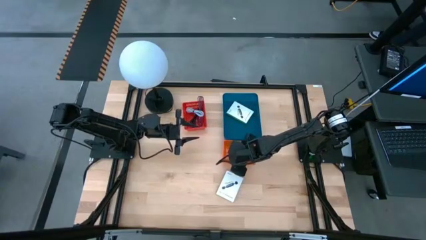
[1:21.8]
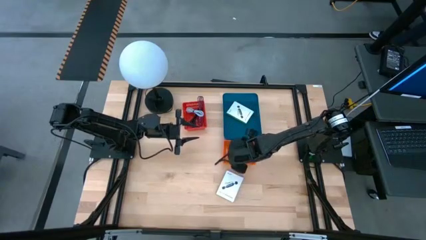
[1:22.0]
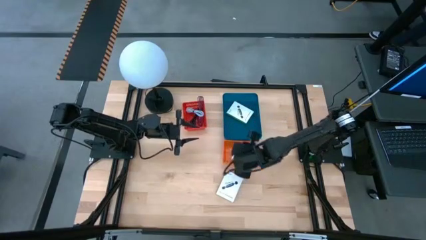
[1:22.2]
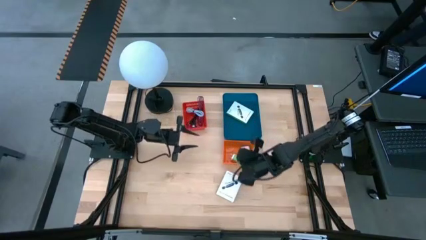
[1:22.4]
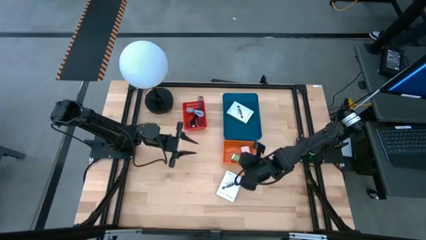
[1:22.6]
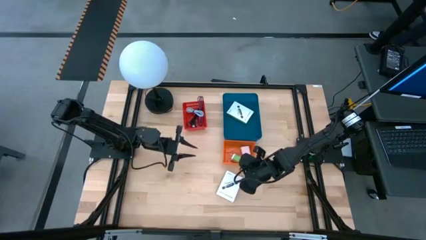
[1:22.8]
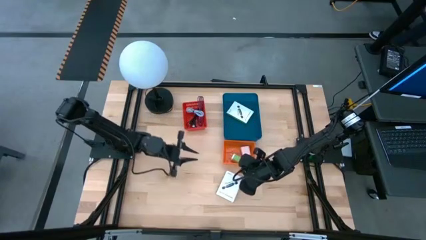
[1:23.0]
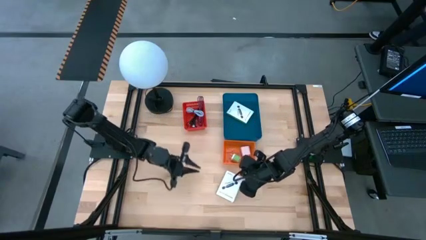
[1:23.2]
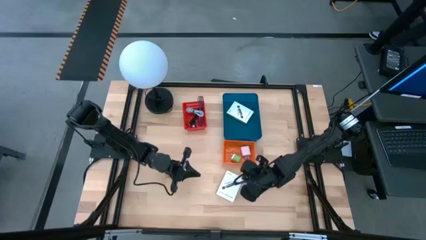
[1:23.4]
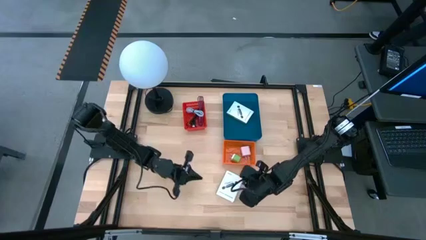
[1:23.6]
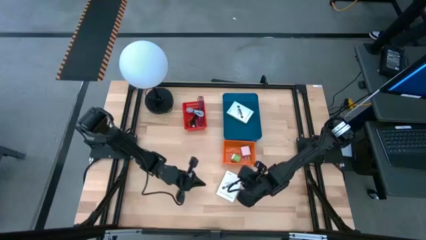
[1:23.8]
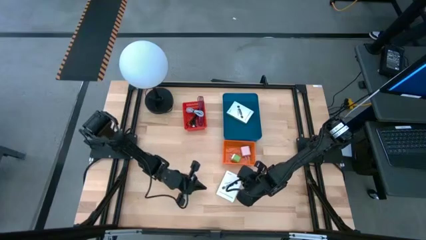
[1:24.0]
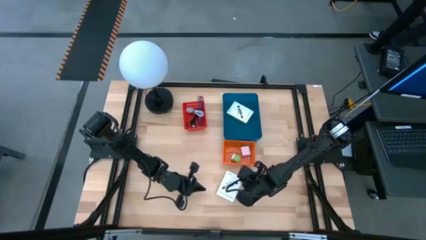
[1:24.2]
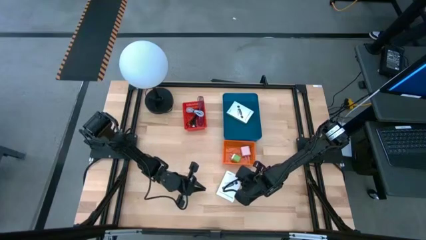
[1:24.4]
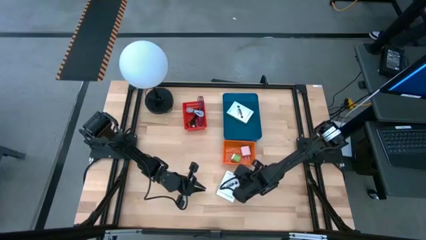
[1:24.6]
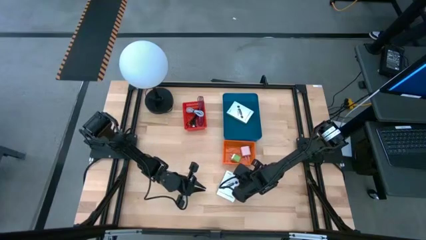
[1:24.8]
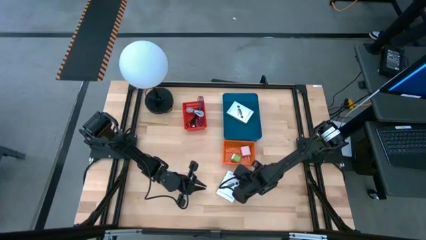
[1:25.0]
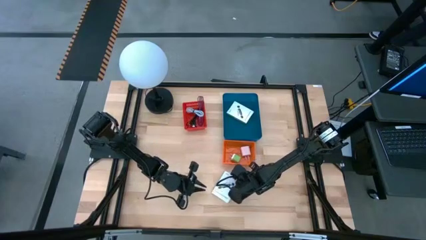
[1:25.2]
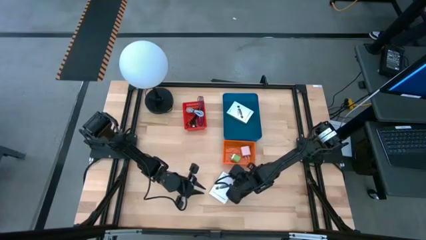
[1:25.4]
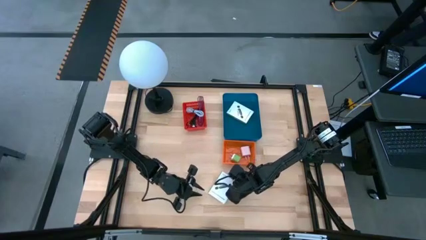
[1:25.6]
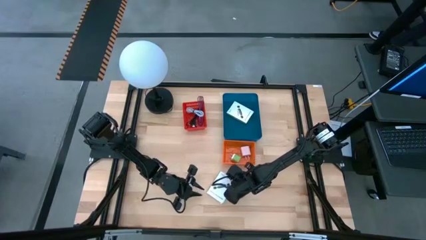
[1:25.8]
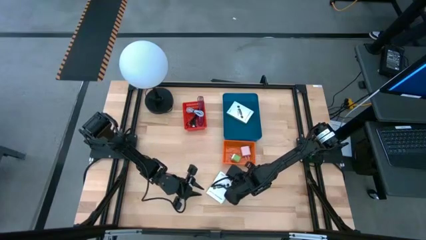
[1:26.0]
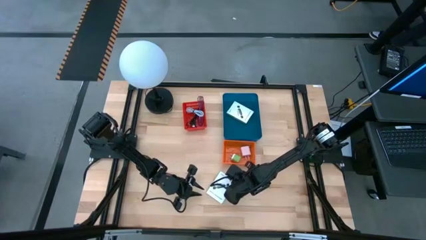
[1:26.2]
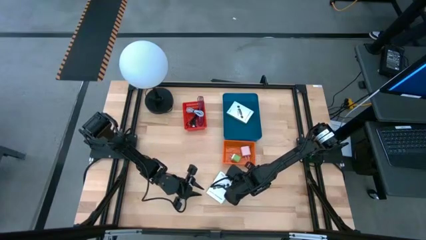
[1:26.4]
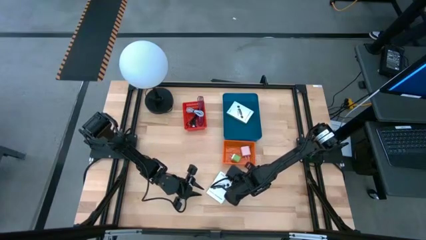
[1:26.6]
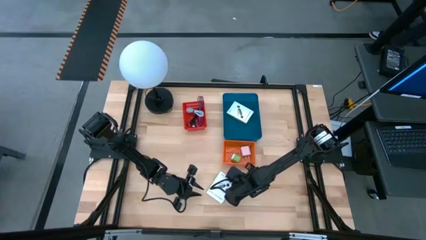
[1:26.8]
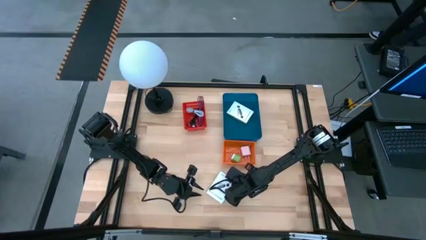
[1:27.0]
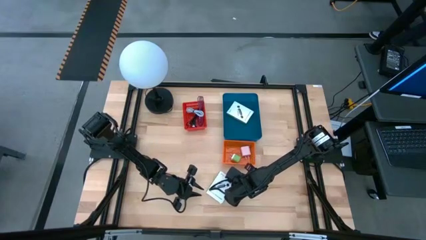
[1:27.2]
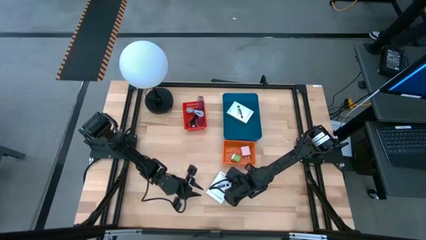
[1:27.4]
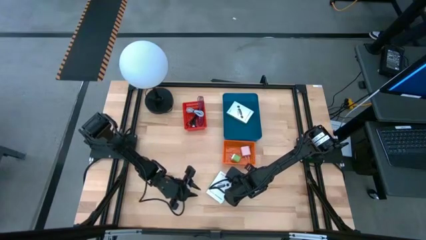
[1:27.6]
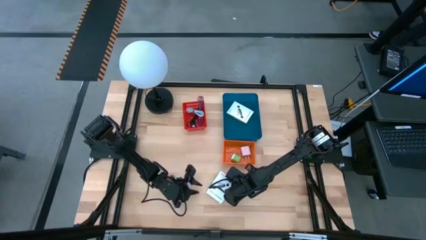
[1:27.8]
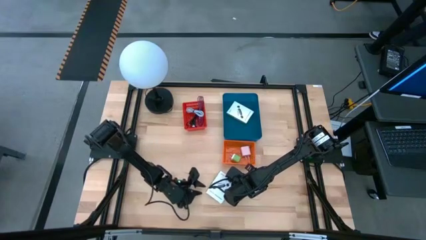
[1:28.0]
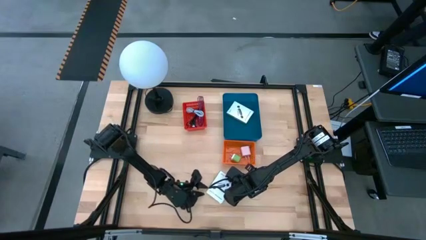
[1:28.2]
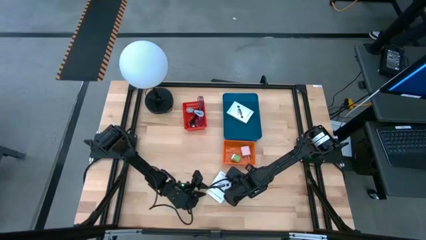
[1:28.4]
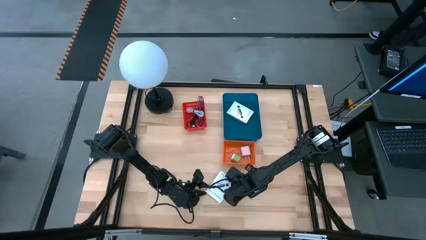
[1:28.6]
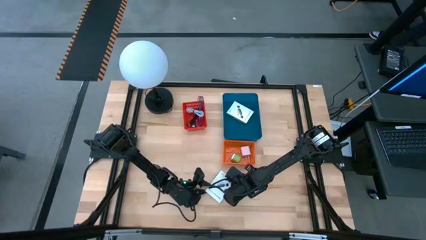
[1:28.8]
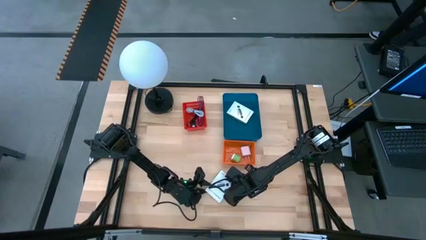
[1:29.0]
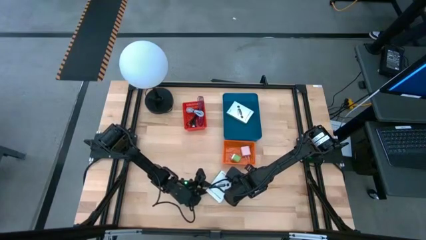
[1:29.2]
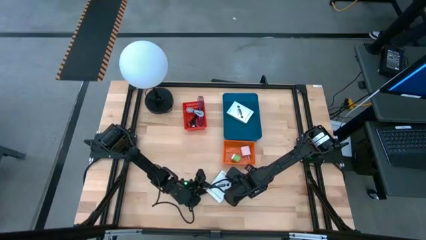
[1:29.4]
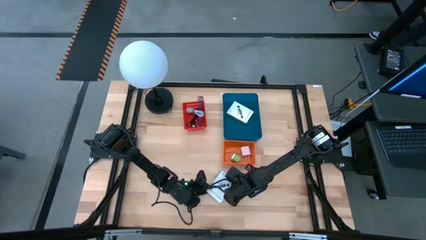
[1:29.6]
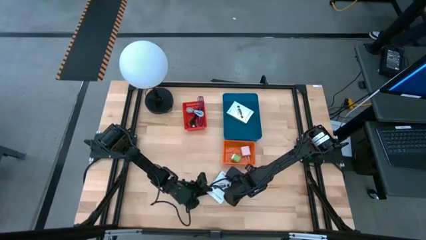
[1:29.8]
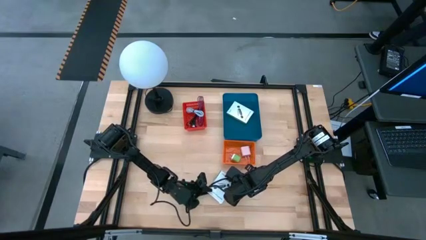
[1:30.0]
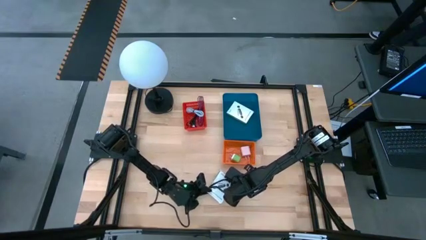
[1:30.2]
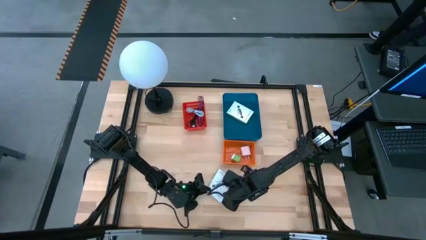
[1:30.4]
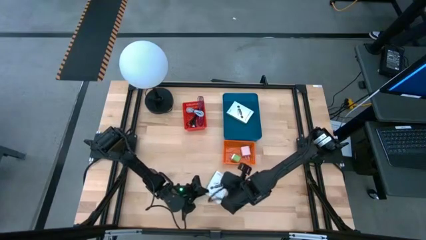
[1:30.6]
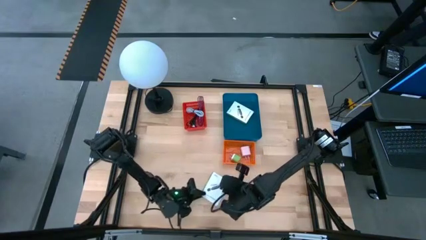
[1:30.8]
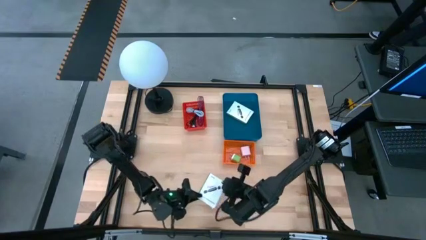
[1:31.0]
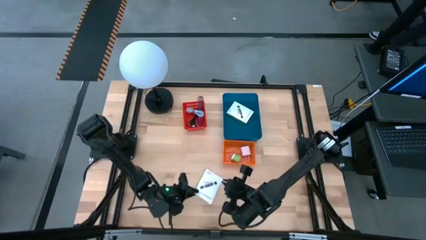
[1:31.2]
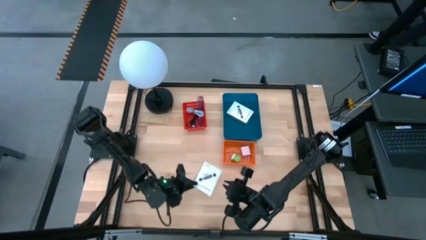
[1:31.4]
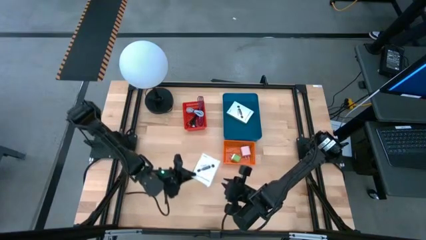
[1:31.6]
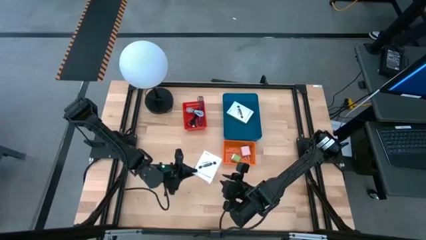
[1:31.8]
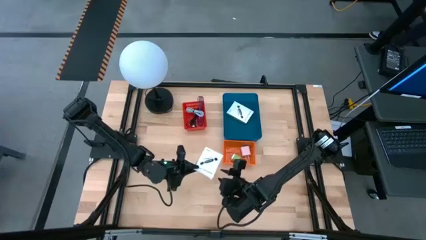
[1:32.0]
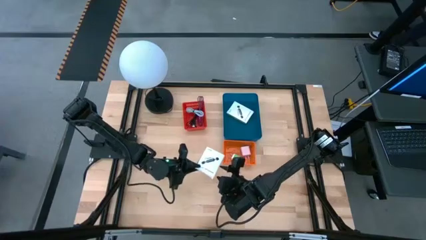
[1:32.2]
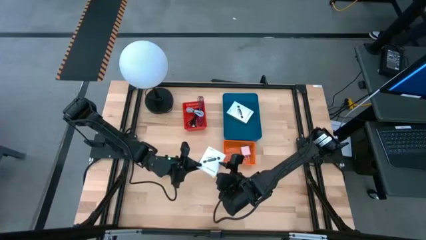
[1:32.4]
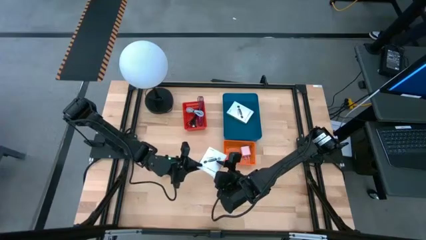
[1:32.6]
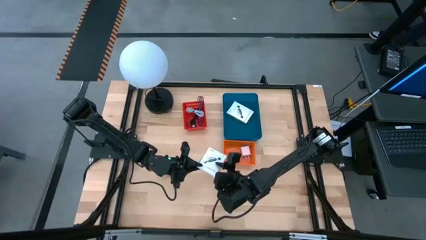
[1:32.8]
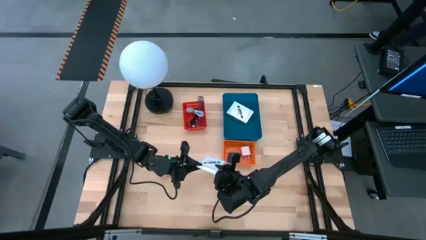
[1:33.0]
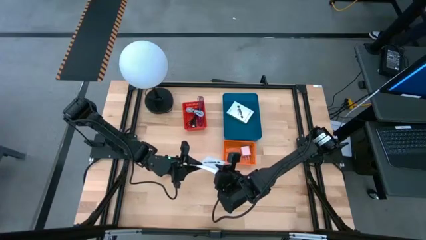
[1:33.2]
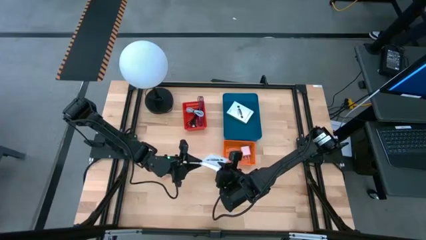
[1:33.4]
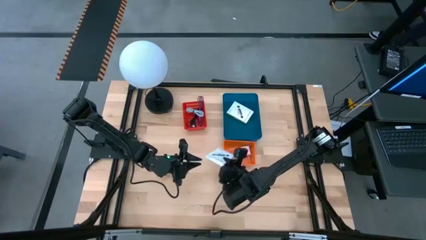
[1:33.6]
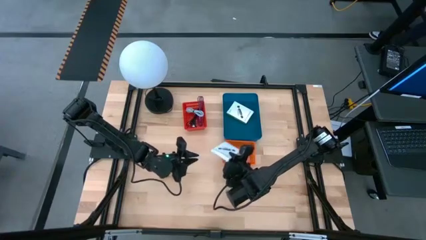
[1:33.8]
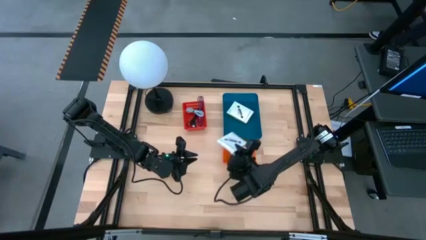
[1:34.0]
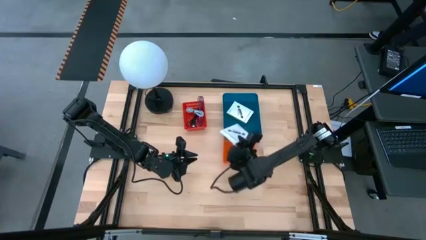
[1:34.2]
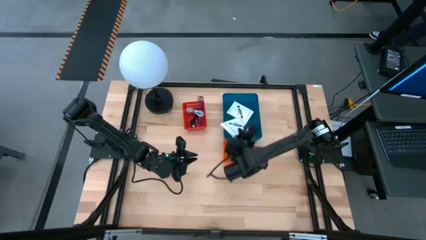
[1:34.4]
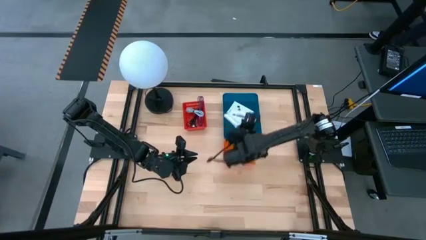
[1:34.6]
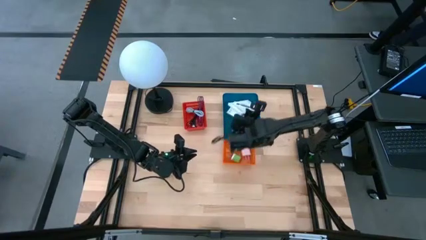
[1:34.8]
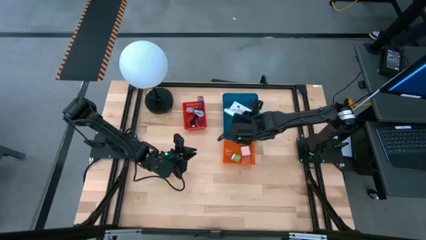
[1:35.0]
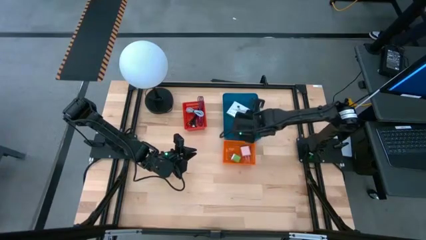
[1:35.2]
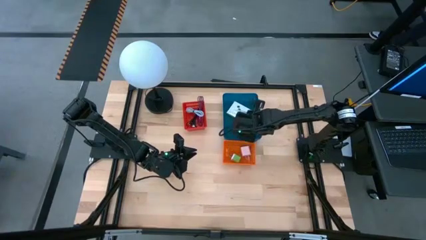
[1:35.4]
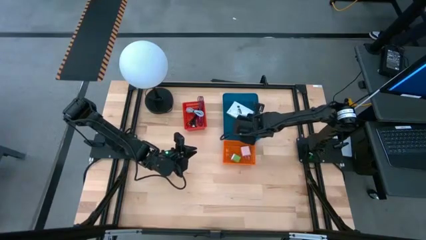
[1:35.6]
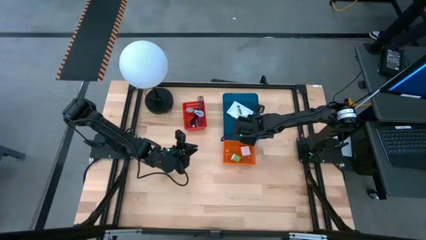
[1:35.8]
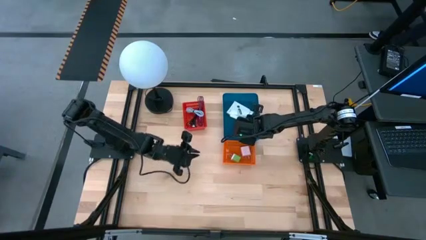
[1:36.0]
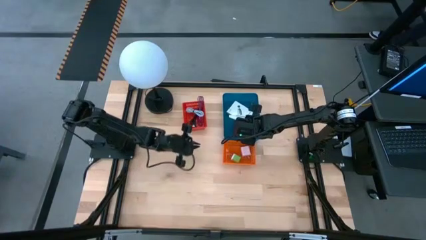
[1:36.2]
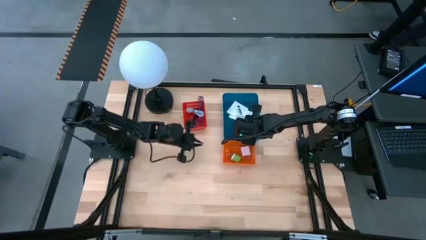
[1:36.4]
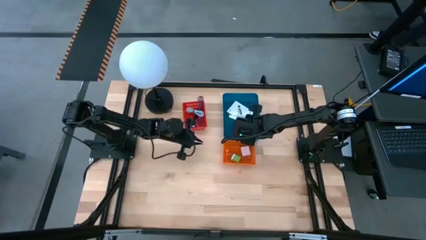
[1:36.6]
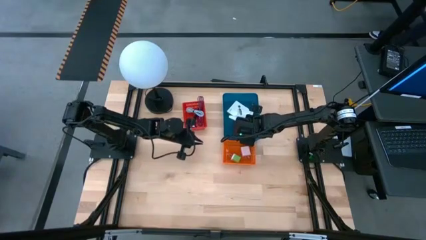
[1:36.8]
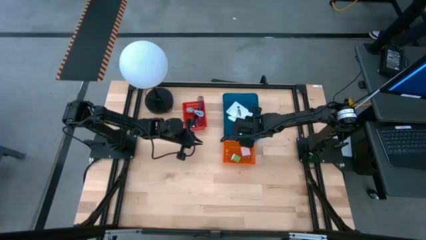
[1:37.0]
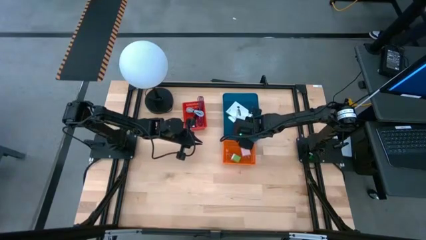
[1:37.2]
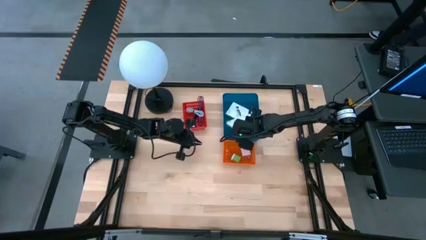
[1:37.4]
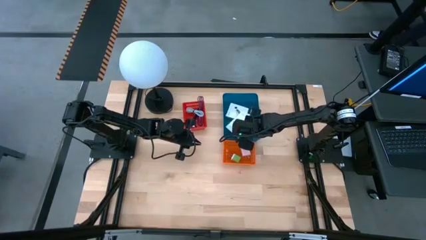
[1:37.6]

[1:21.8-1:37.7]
Task: Pick and place items into bin
Put the white card reader box into the blue bin
